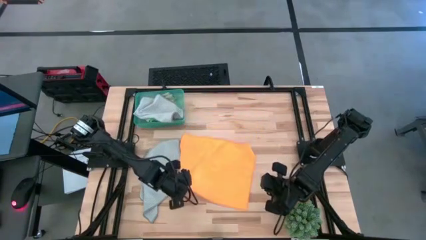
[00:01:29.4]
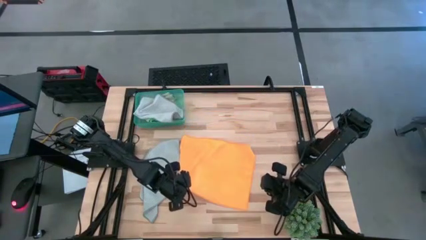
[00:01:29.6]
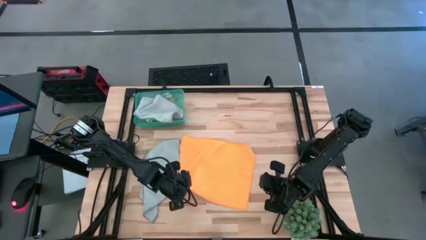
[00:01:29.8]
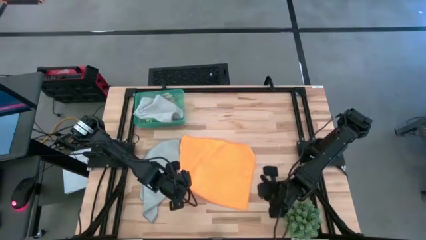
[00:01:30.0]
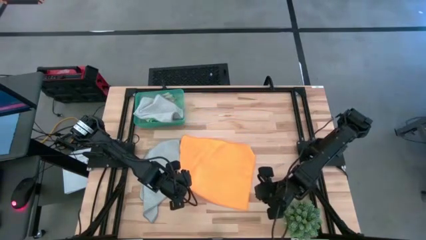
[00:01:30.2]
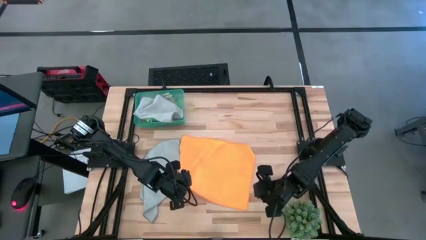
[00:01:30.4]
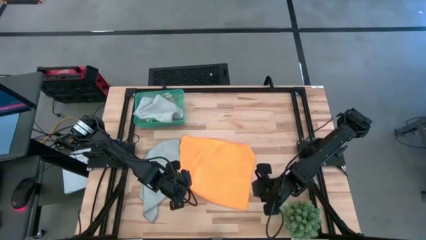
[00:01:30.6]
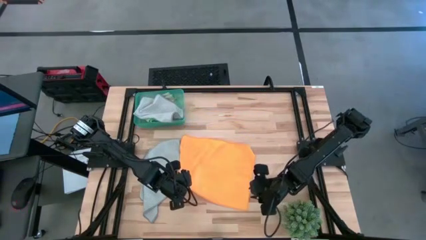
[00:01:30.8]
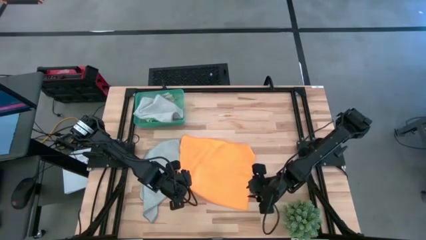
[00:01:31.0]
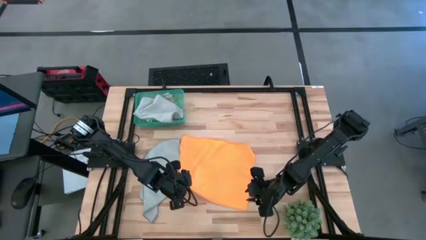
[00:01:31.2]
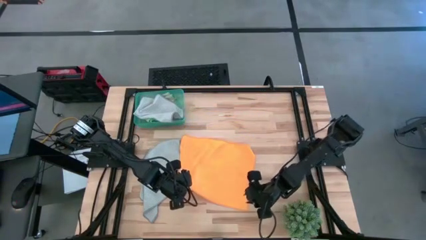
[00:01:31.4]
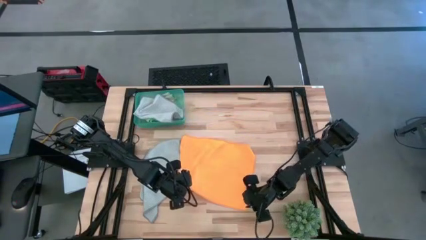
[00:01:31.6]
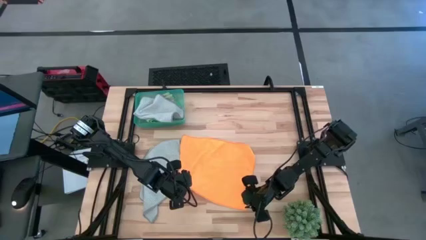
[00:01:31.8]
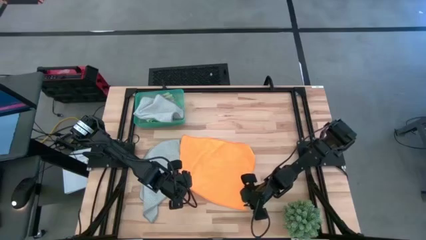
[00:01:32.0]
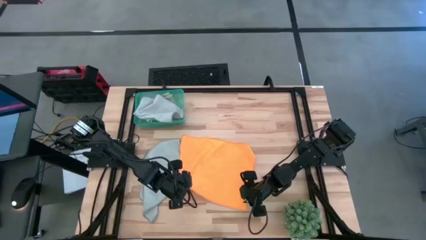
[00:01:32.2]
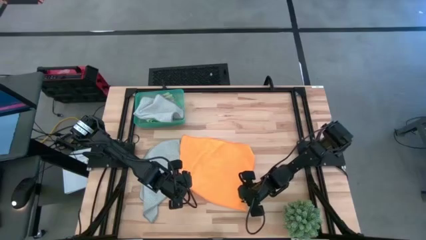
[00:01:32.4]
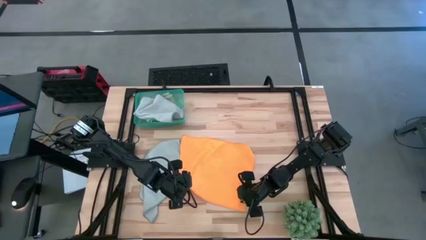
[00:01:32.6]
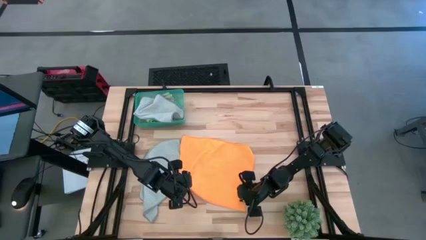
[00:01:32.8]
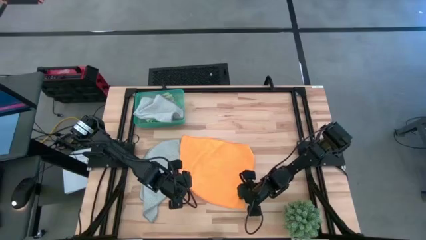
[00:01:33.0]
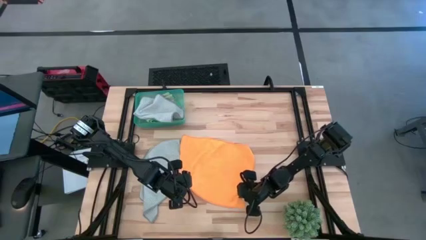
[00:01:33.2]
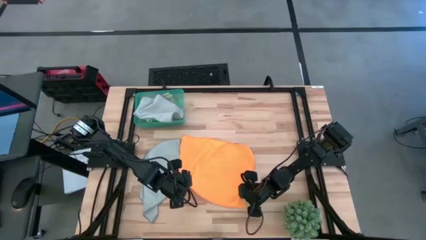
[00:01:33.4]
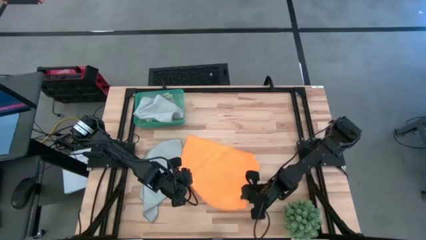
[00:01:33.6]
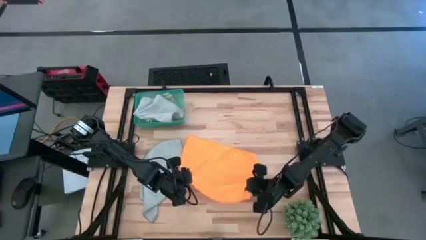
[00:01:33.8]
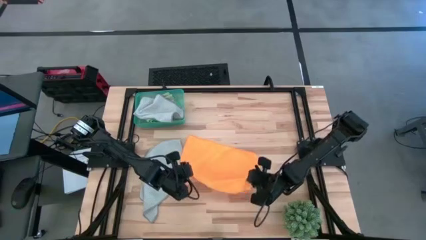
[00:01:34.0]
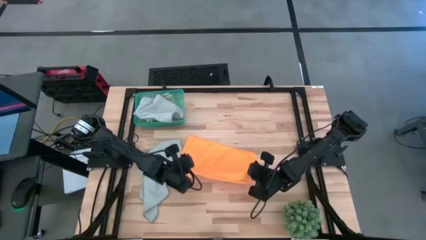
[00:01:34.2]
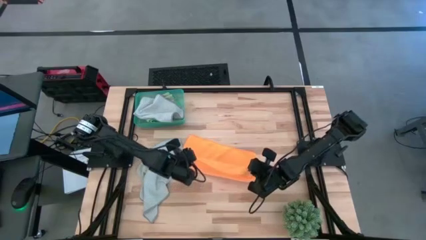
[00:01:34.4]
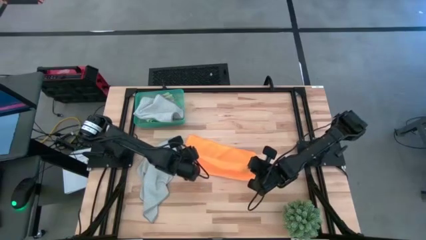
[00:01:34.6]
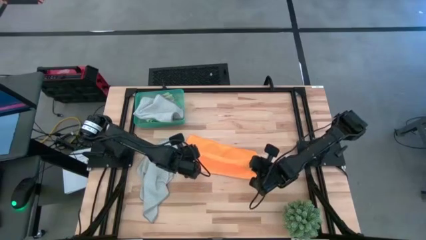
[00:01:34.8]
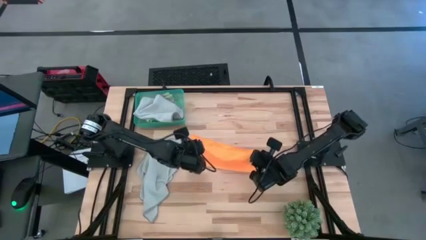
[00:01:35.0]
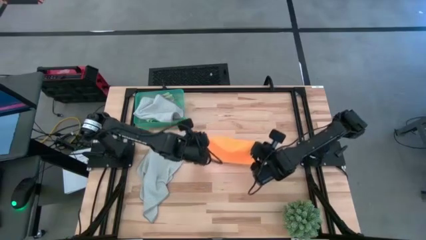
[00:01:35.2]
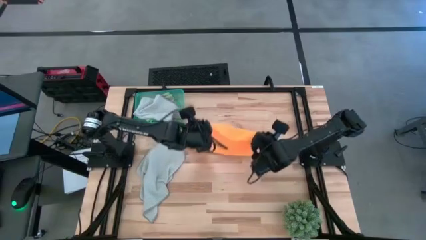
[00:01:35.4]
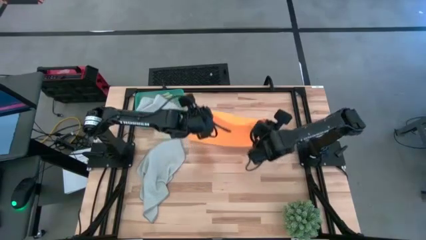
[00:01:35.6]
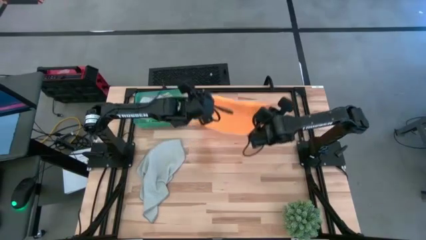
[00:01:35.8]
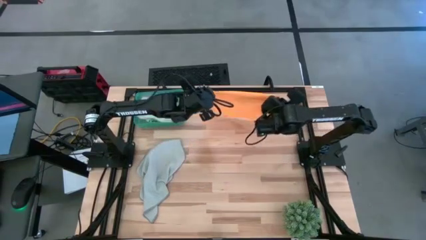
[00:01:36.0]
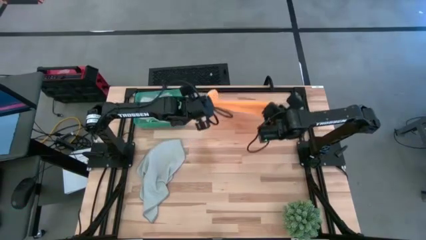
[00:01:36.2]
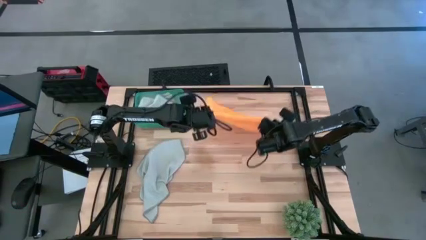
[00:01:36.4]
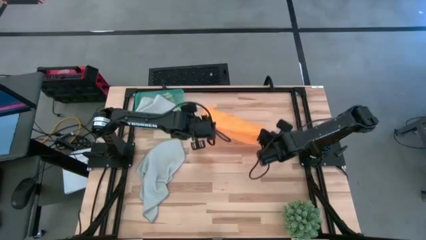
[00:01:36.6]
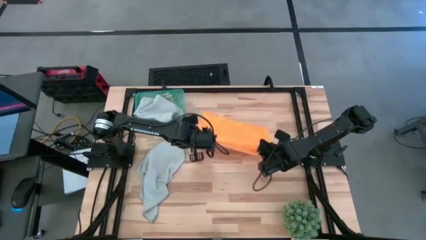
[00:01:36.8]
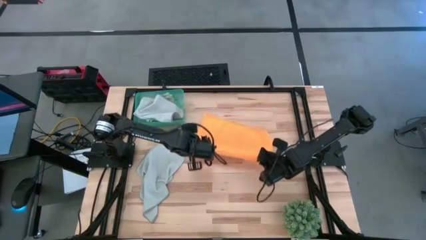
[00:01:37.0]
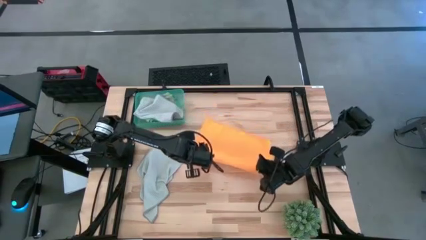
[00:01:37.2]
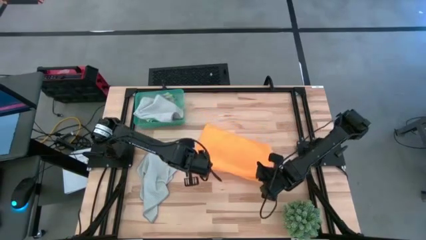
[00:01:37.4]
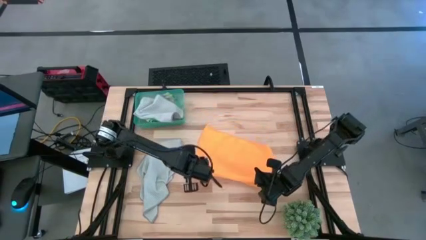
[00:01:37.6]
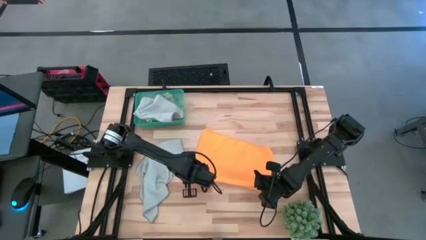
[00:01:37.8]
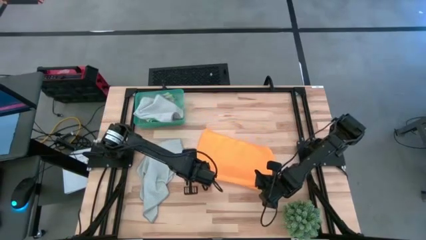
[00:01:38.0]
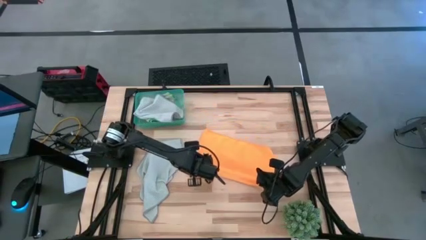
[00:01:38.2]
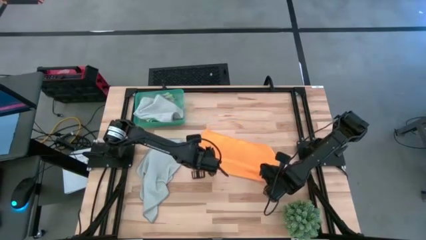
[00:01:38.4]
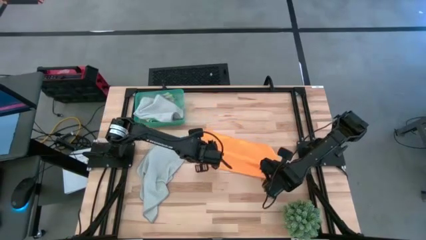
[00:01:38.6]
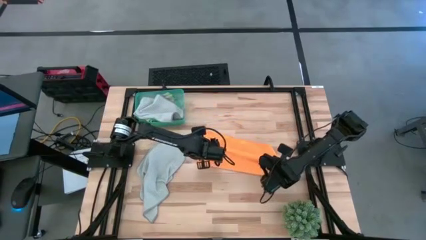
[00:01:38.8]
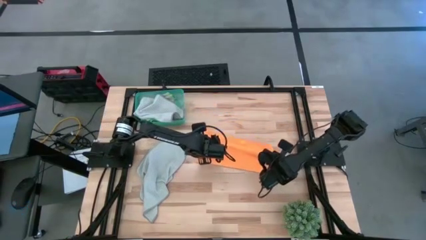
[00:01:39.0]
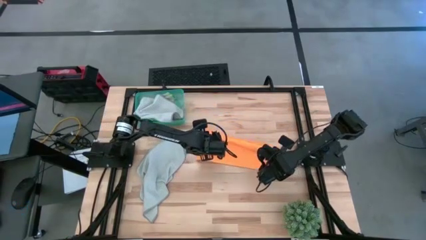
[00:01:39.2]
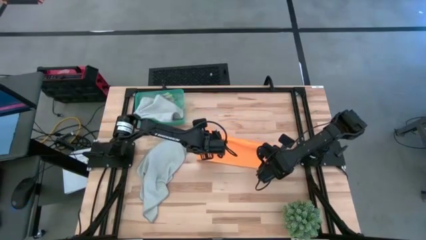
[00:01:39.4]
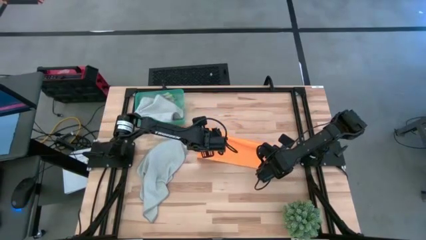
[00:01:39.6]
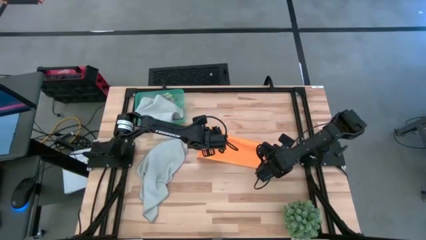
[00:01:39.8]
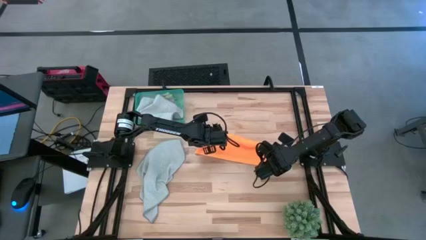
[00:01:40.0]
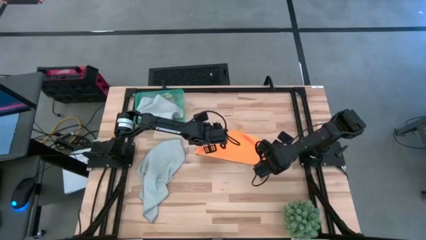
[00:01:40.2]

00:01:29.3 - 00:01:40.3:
Task: Fold microfiber towels
Fold the orange towel

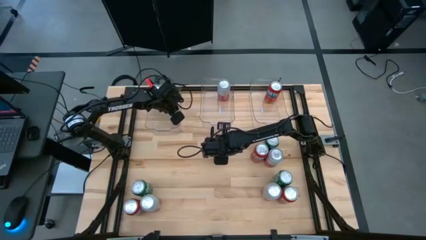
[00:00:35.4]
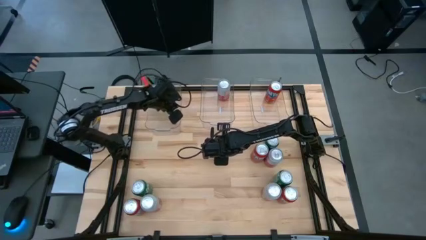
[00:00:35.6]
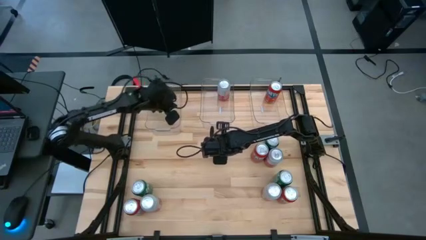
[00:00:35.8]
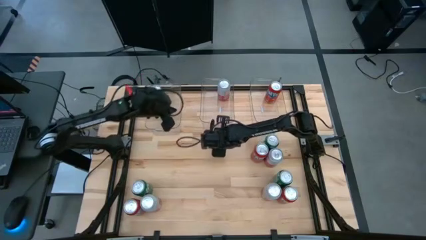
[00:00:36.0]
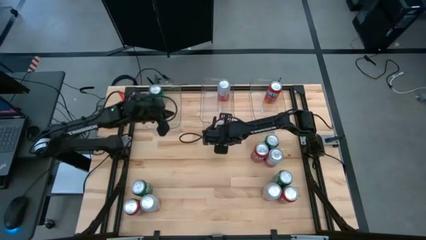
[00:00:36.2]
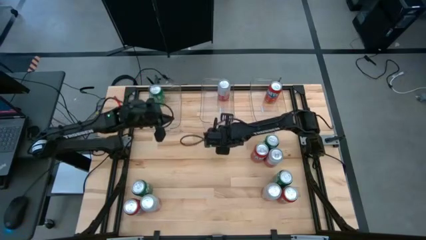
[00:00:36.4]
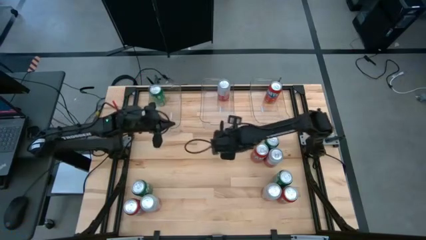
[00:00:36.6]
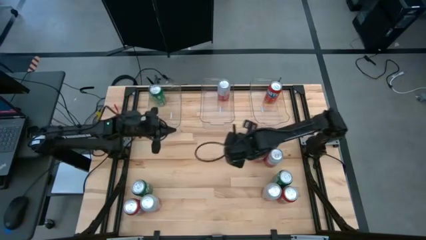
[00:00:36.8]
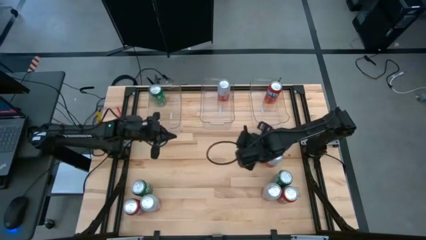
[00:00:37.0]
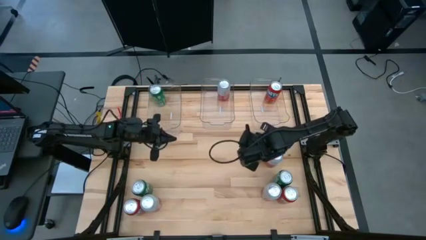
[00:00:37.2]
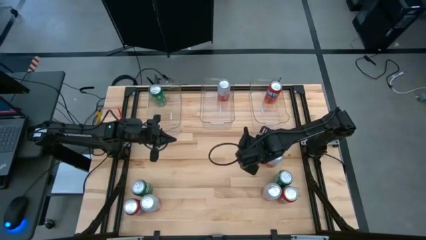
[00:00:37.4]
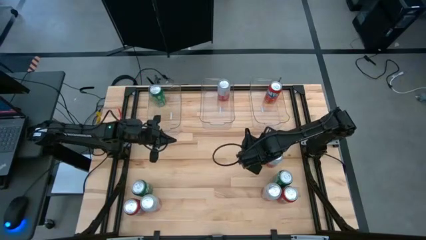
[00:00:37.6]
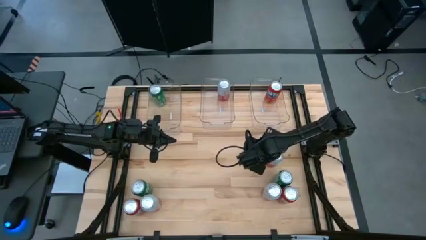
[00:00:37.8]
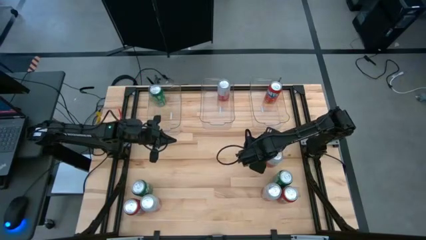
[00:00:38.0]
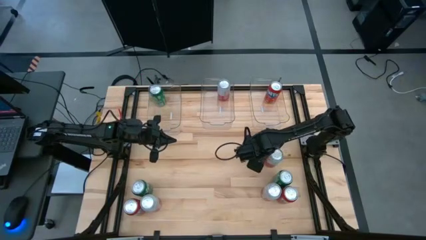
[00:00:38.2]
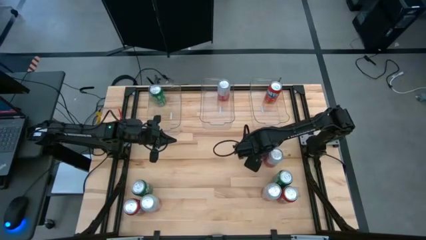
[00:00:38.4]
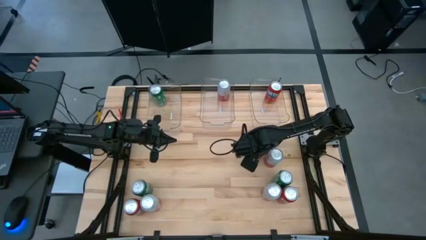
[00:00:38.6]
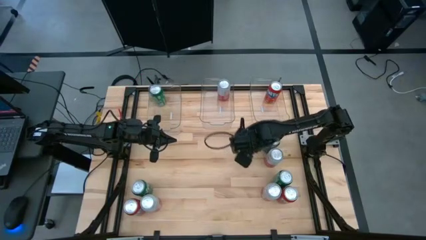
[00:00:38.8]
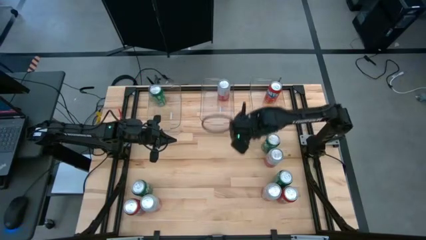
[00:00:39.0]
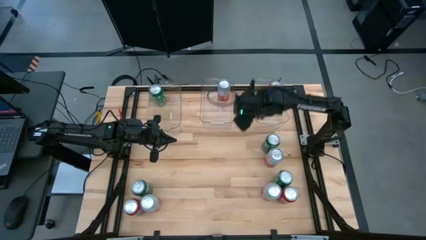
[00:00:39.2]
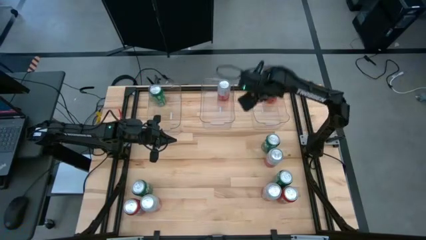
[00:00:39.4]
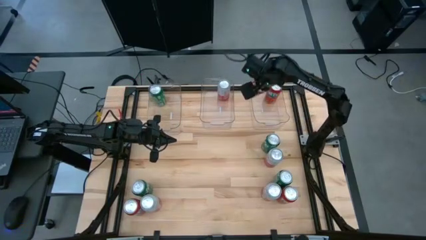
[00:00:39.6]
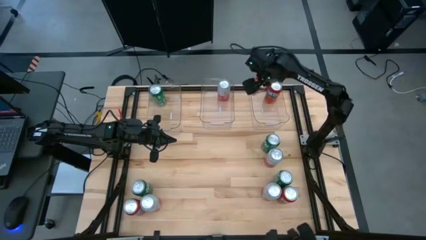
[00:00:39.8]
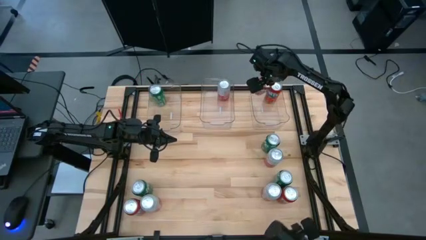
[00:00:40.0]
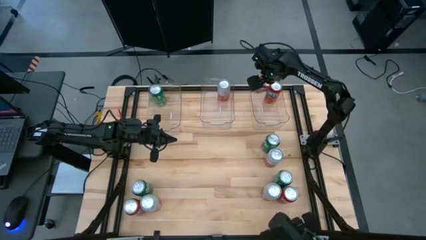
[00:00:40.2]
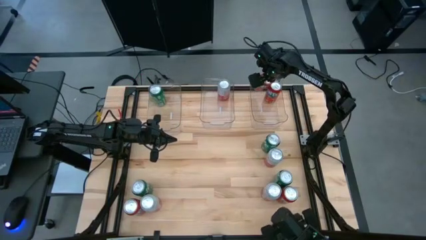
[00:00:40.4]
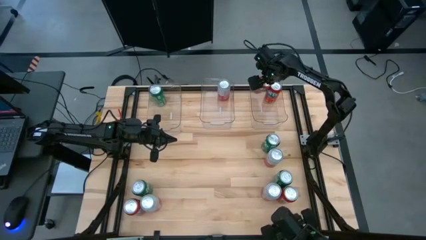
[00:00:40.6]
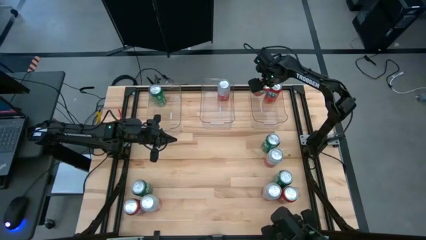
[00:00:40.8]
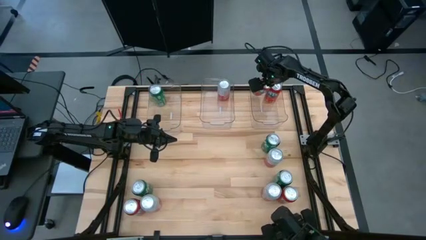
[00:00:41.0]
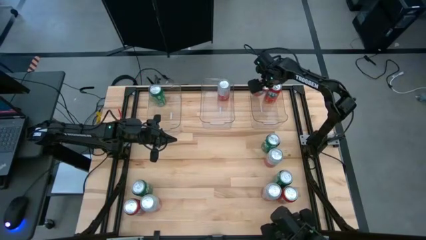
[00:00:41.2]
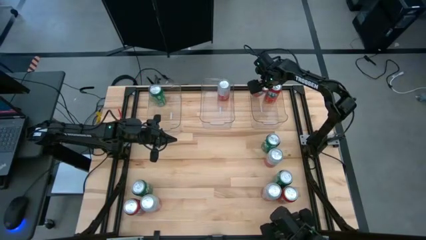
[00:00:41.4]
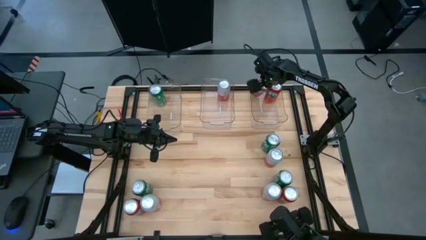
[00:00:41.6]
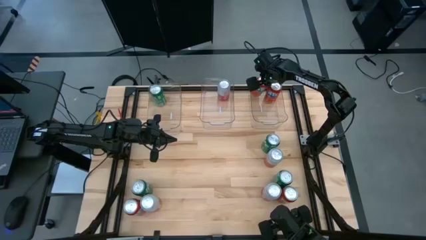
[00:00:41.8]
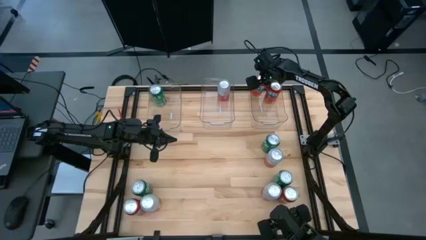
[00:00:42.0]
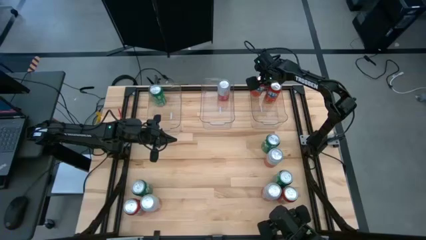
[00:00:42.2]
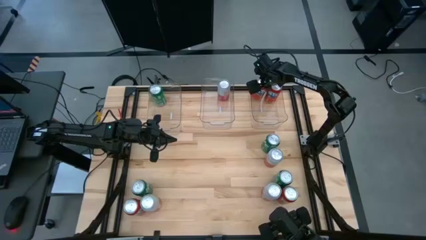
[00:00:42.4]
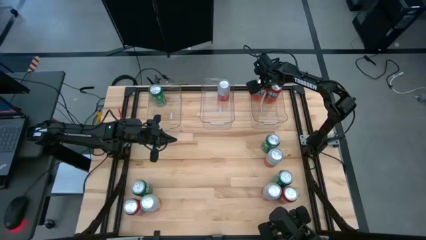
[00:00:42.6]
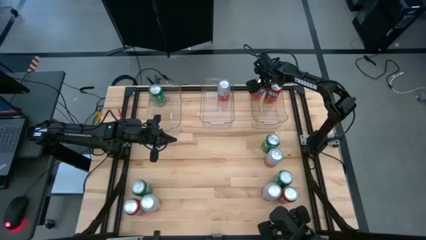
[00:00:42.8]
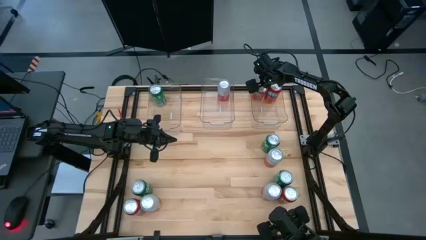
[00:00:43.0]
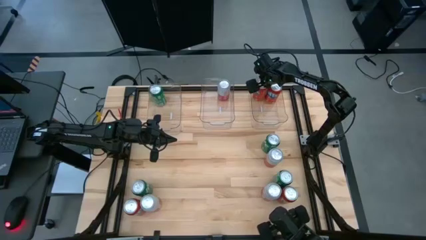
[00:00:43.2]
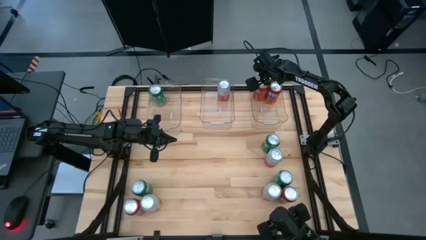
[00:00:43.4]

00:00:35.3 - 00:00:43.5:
Task: Sort soda cans
Put the red soda can into the right transparent bin
